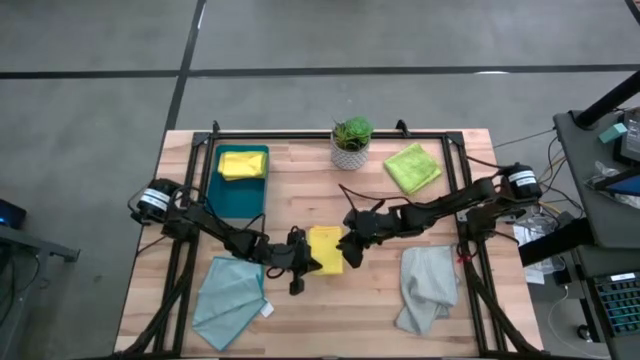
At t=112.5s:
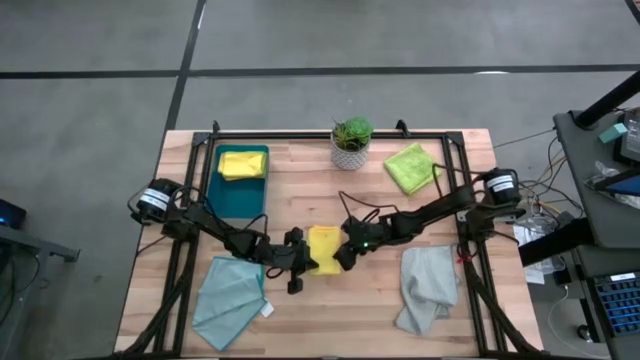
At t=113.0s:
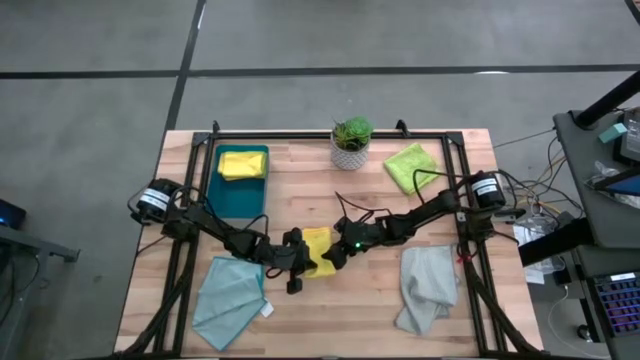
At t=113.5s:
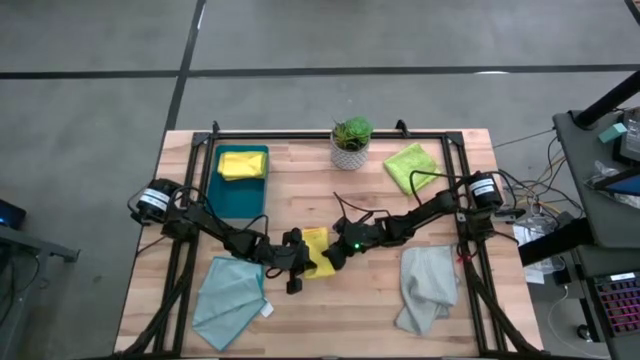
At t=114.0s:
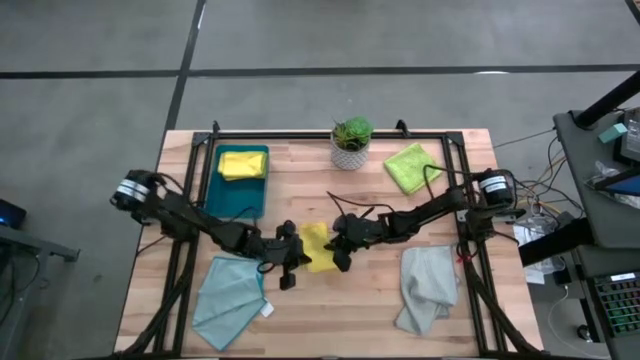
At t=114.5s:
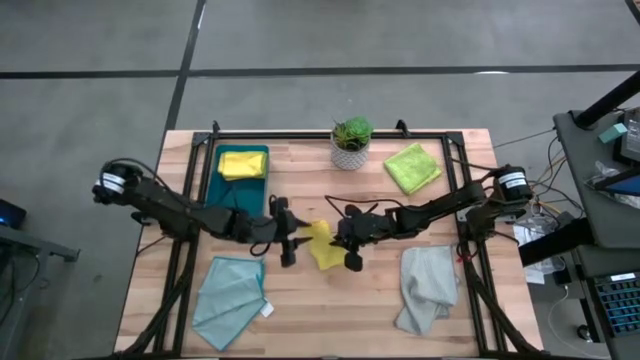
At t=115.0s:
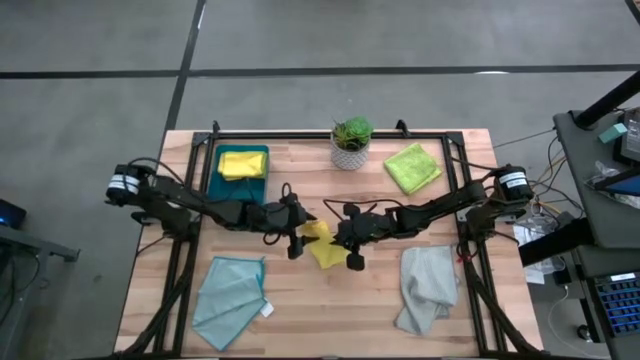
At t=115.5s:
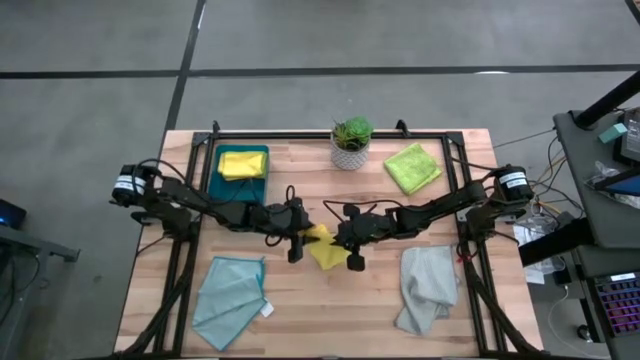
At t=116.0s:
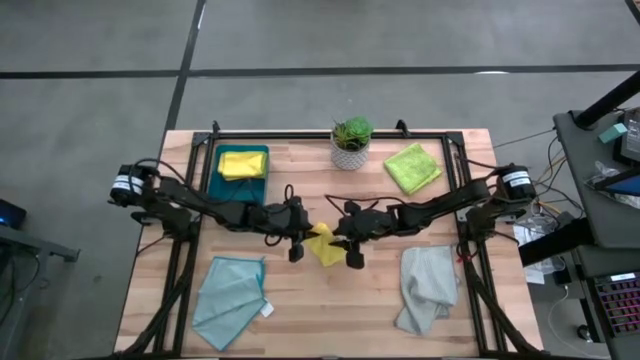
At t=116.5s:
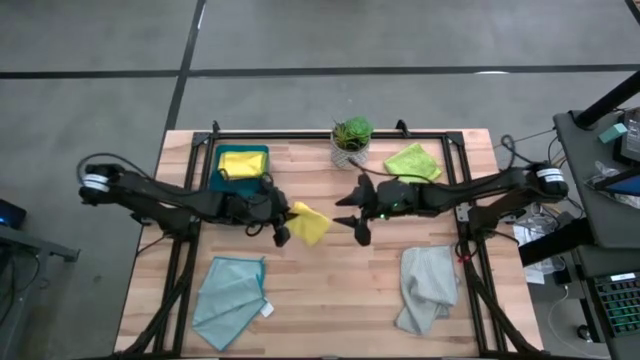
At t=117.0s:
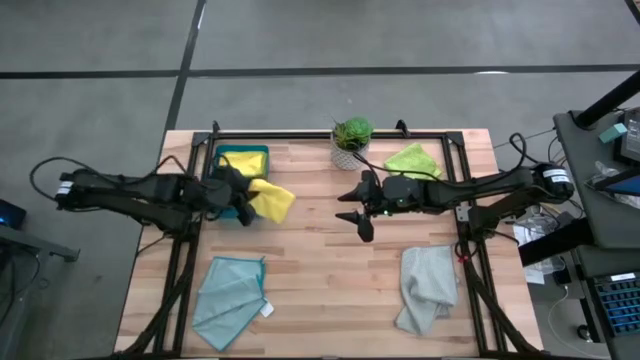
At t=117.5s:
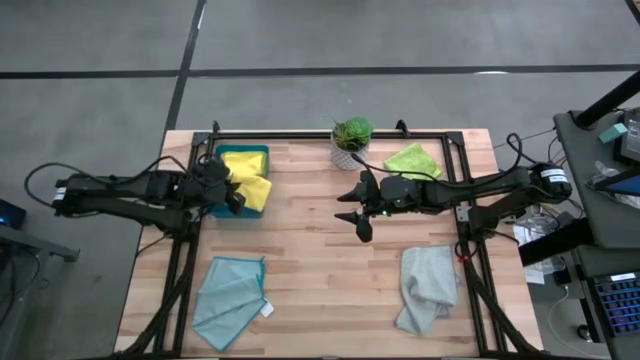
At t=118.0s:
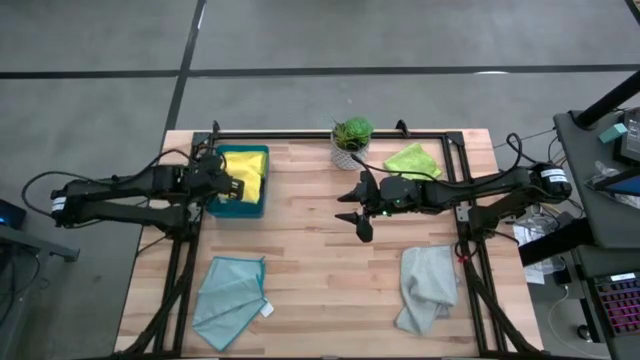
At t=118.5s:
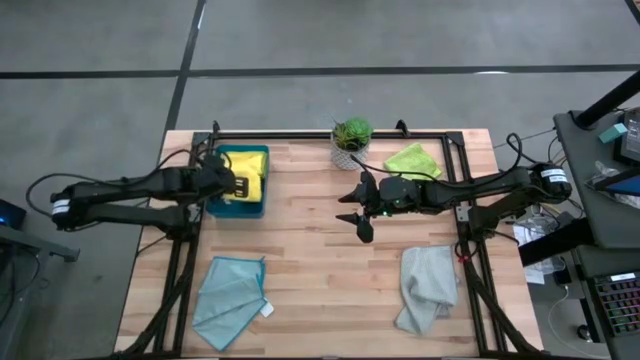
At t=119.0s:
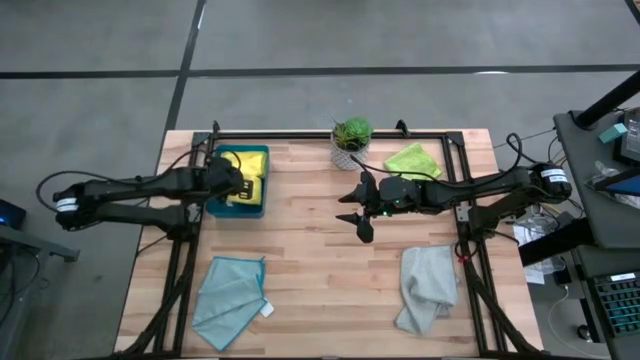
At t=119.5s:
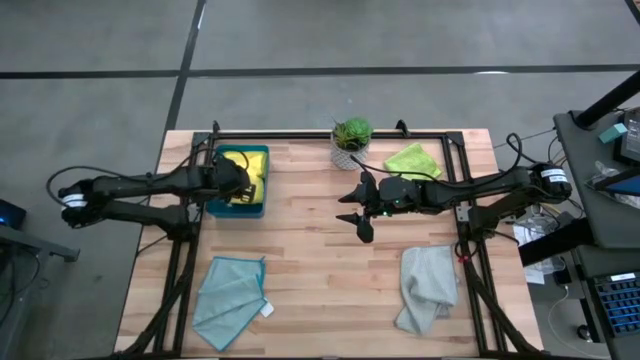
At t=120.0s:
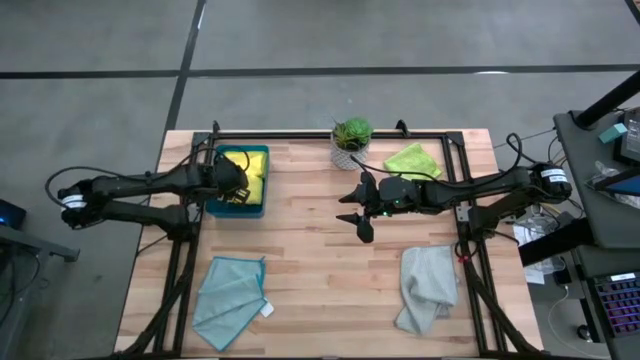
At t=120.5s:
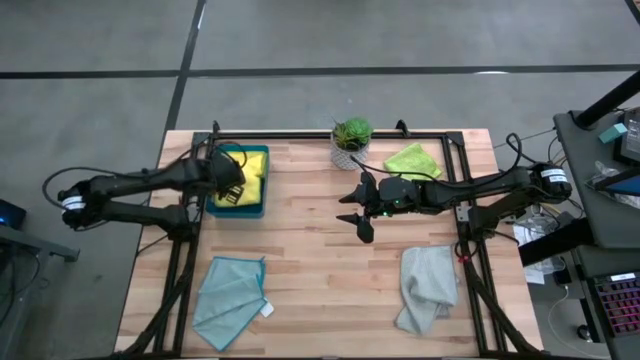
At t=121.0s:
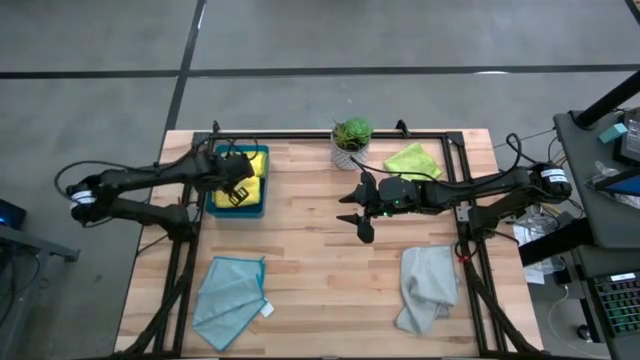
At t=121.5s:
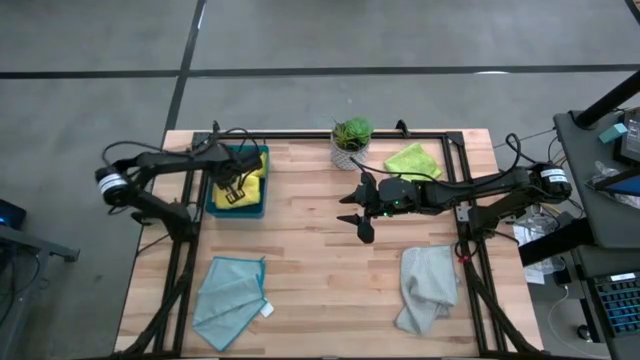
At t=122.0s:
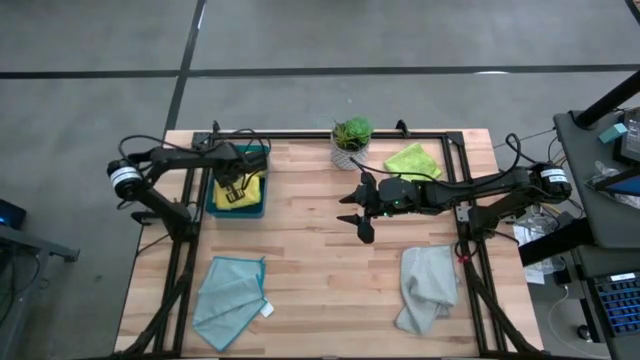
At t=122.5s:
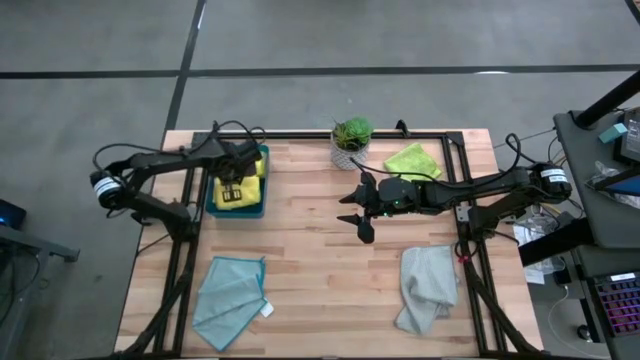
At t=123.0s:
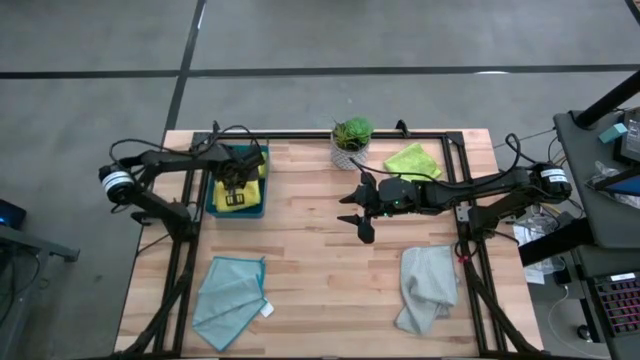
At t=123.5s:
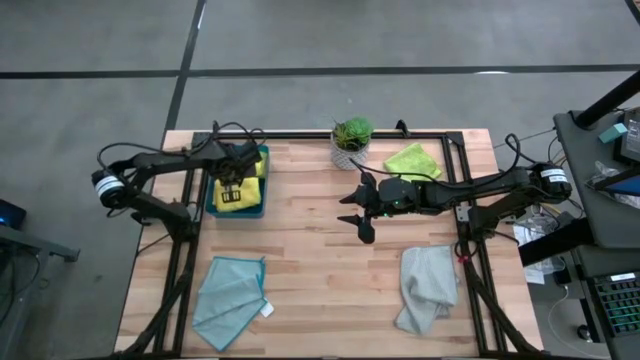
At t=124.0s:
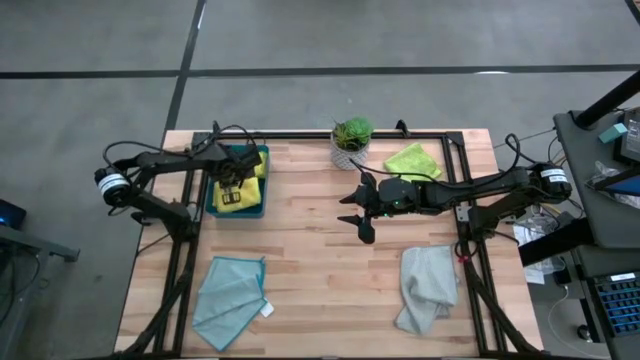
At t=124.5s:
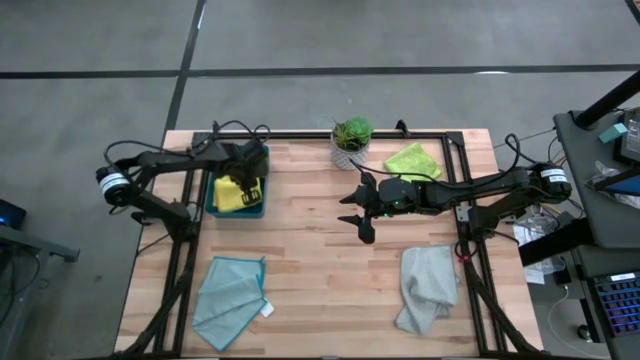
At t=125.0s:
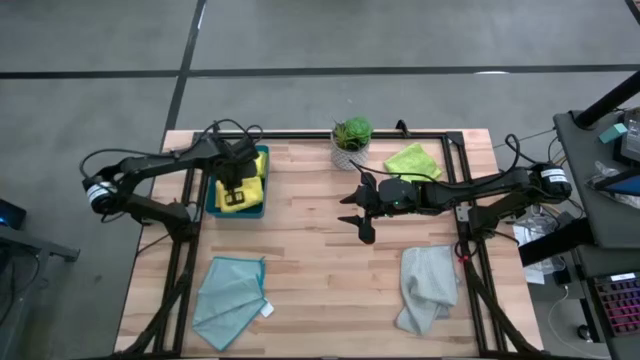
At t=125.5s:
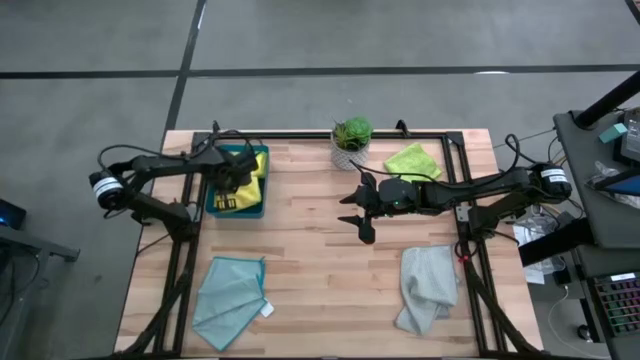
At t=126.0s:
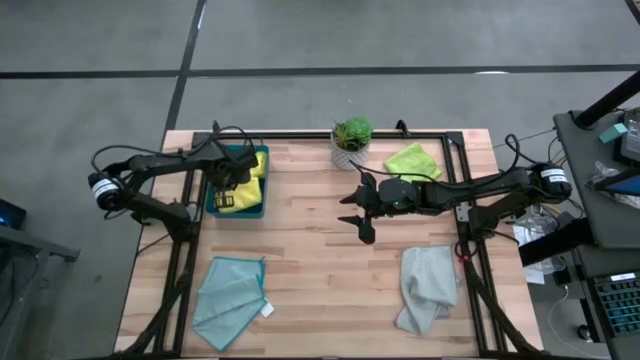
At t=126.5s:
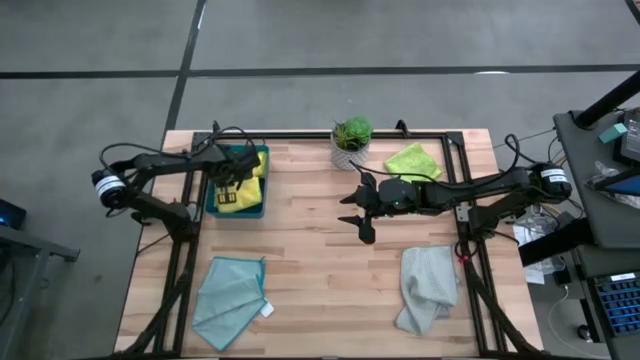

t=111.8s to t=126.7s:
Task: Fold microfiber towels
Put the folded yellow towel into the blue bin

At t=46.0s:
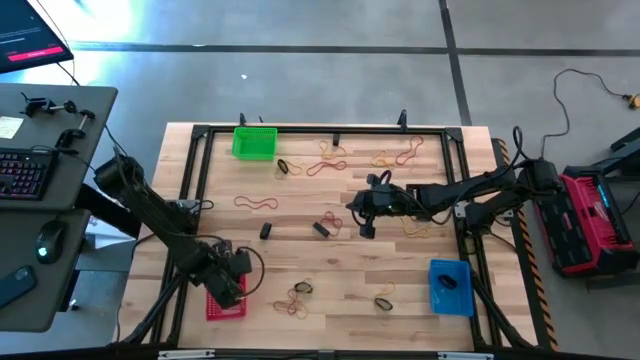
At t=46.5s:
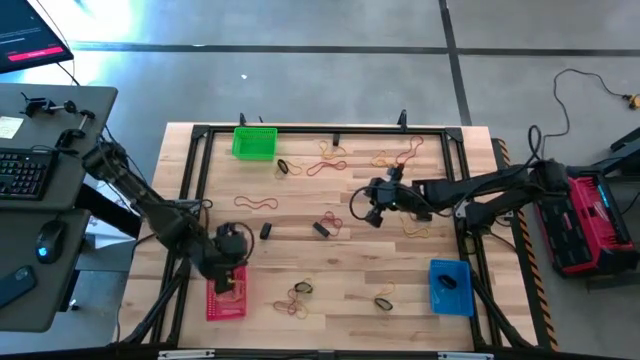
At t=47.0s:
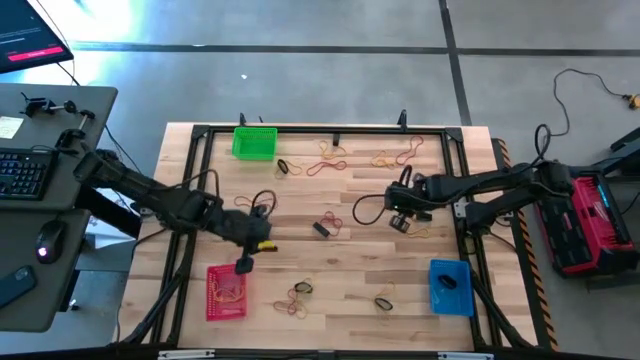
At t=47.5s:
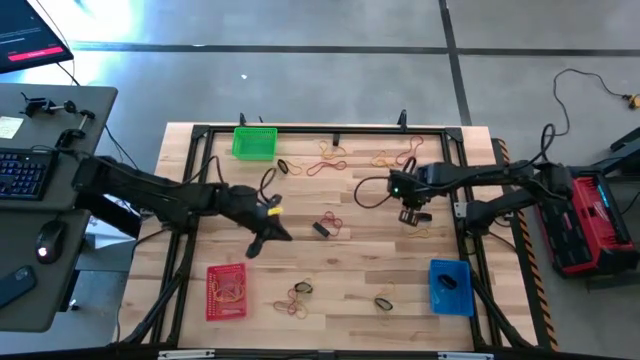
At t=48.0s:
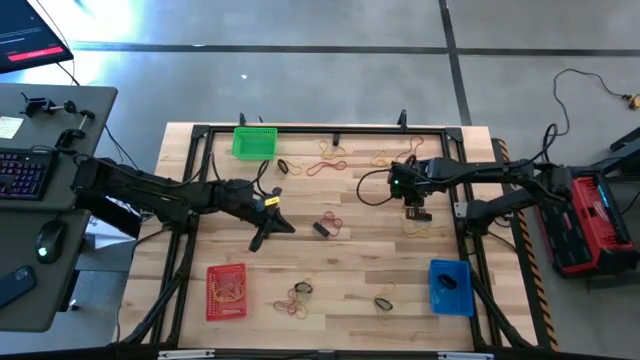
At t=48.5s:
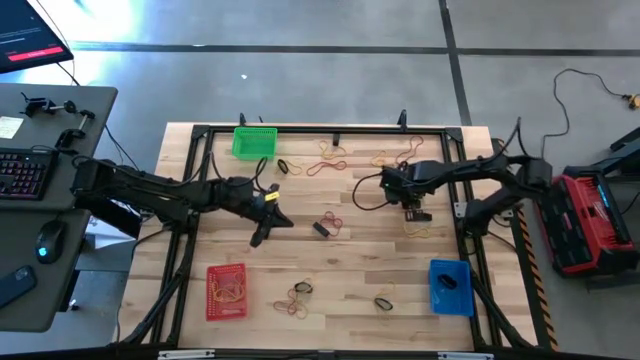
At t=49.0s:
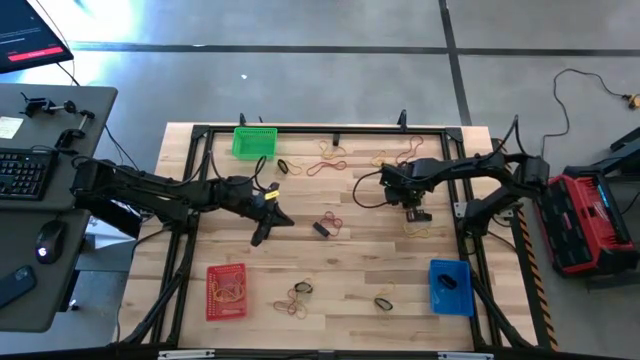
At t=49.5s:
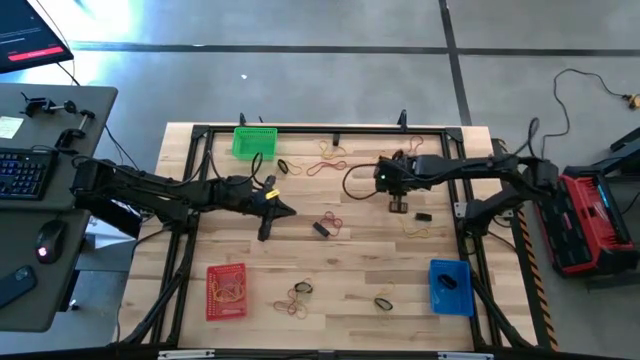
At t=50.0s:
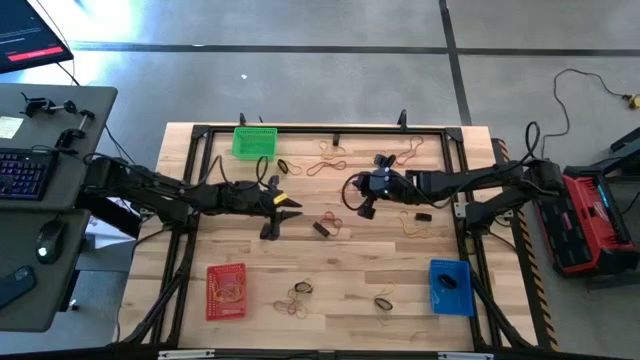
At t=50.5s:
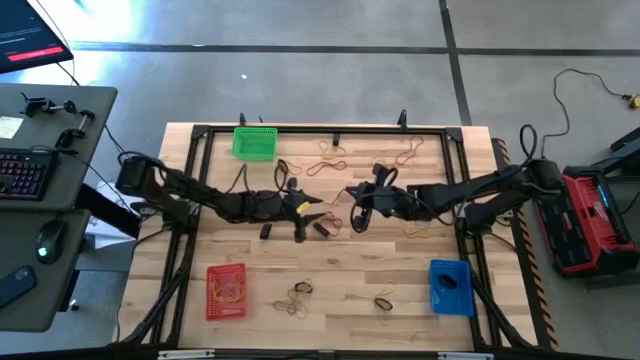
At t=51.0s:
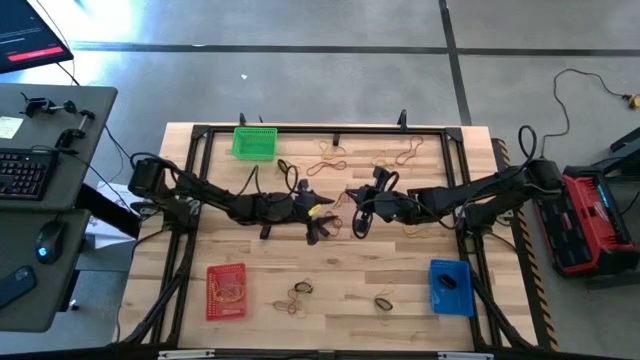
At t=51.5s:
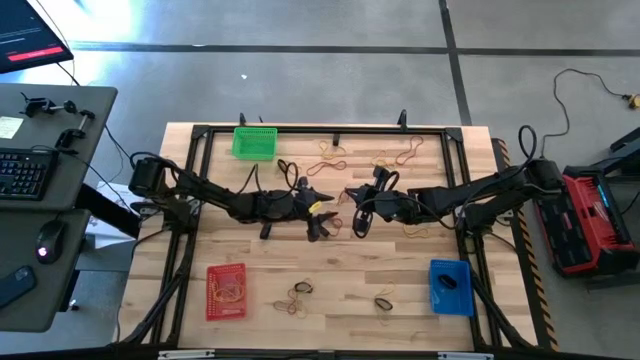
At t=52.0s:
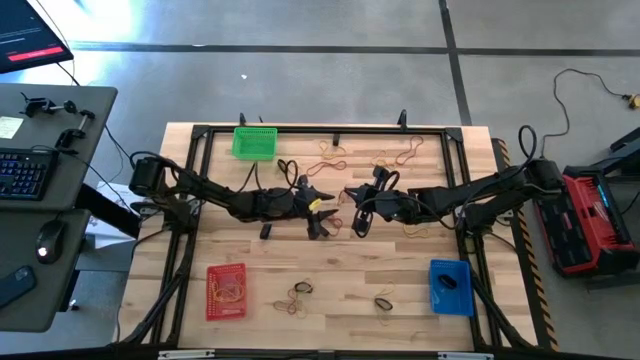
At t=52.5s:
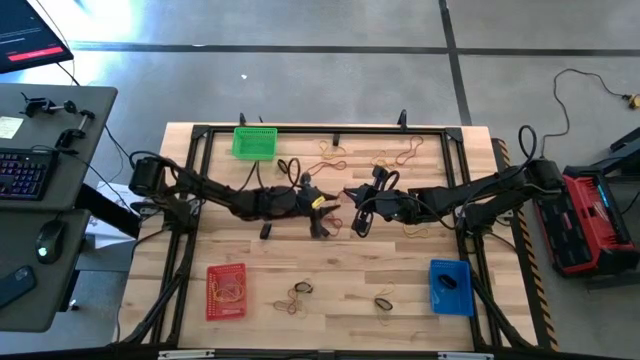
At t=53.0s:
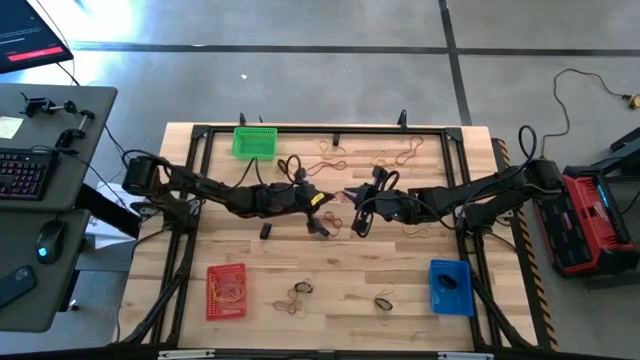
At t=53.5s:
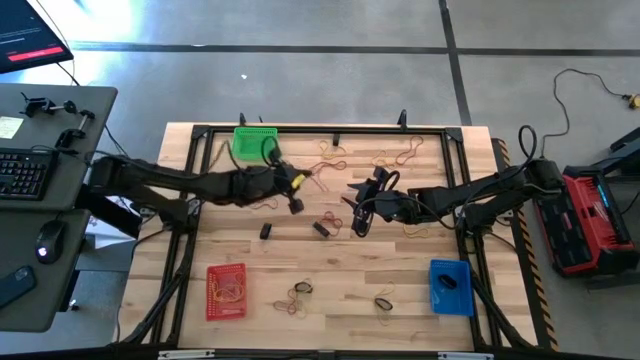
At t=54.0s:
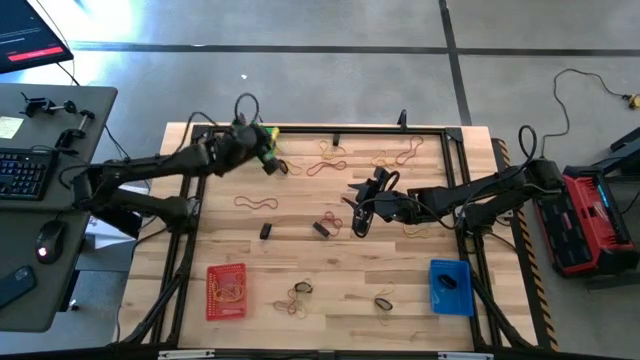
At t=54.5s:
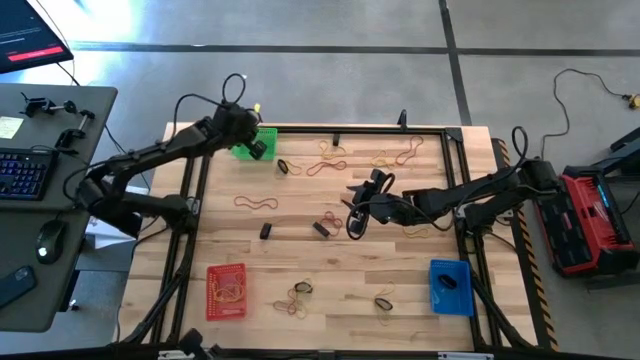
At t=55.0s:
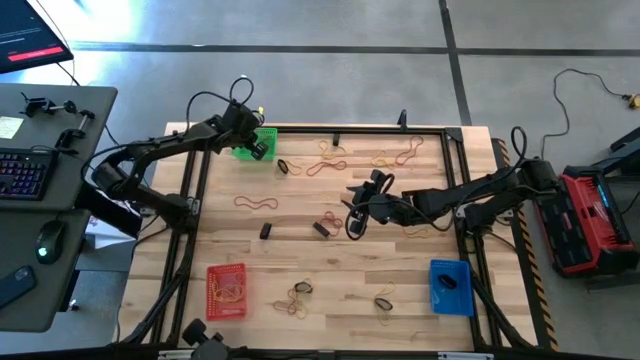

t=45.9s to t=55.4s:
Task: Sort rubber bands into baskets
Put the red rubber band into the green bin
